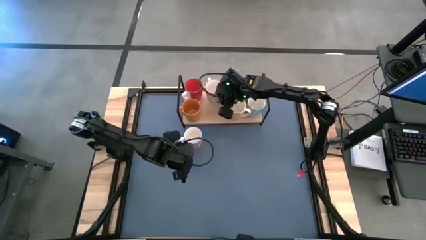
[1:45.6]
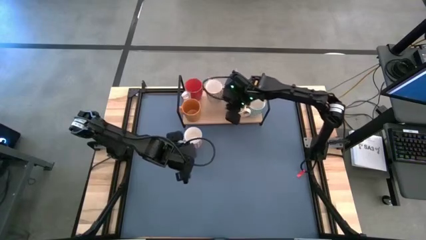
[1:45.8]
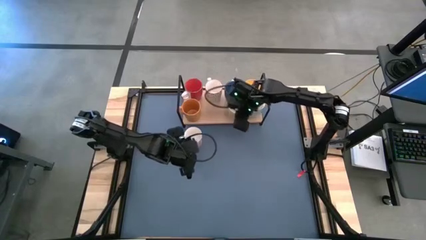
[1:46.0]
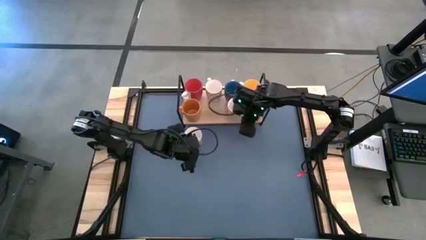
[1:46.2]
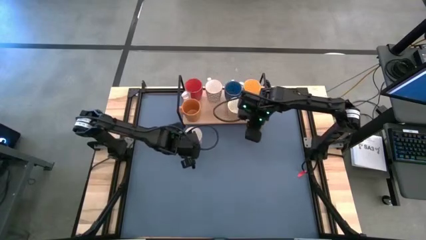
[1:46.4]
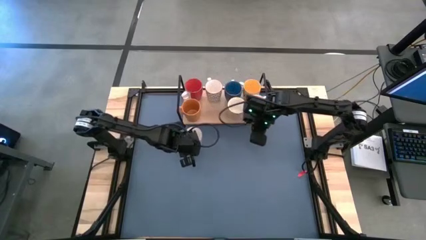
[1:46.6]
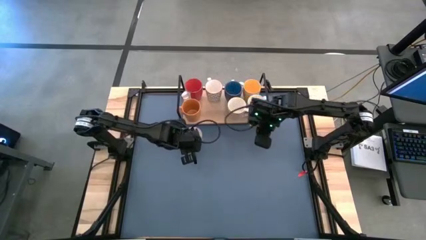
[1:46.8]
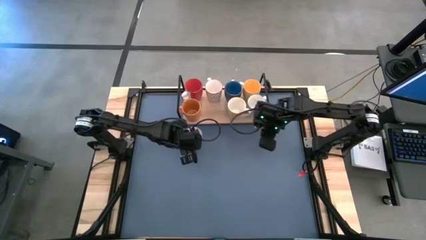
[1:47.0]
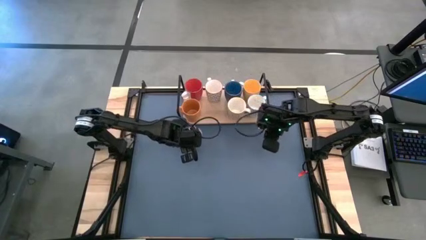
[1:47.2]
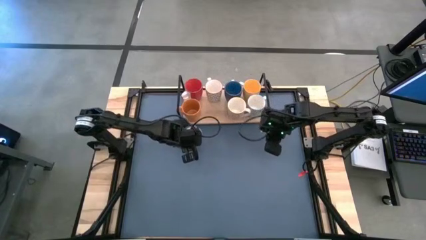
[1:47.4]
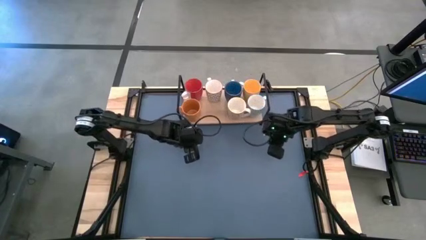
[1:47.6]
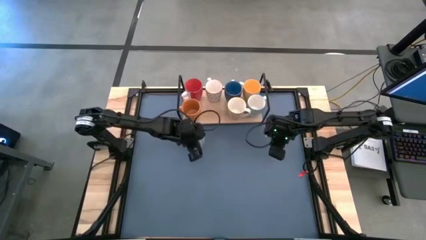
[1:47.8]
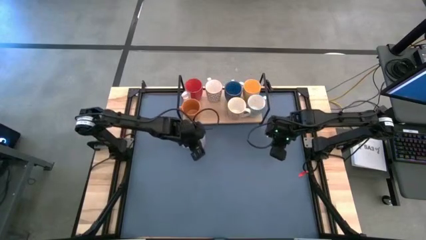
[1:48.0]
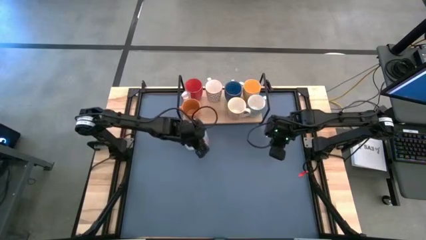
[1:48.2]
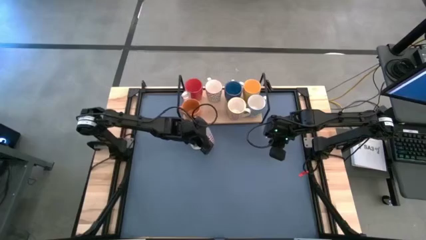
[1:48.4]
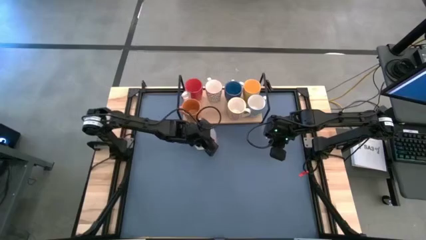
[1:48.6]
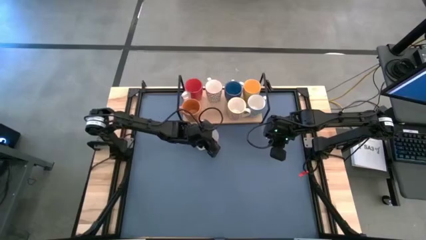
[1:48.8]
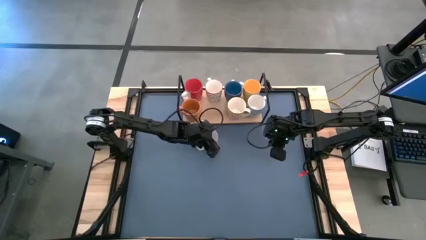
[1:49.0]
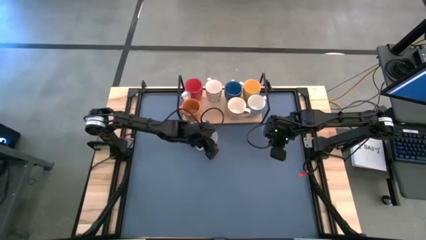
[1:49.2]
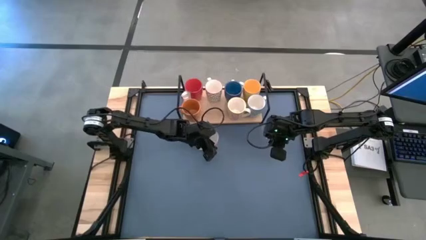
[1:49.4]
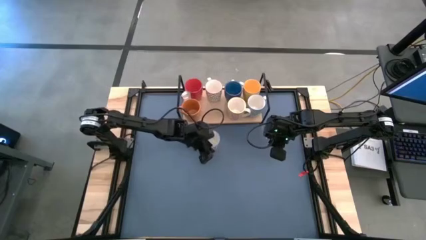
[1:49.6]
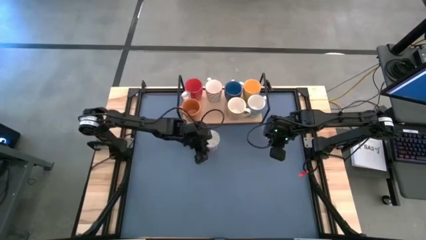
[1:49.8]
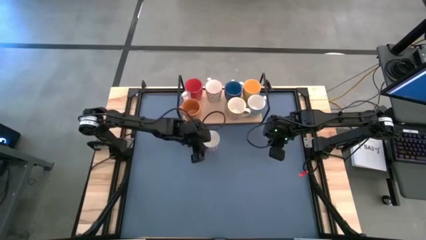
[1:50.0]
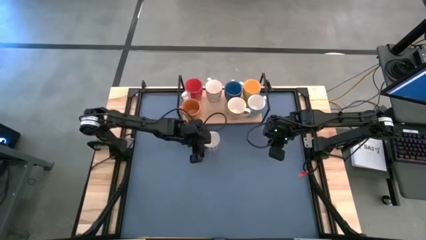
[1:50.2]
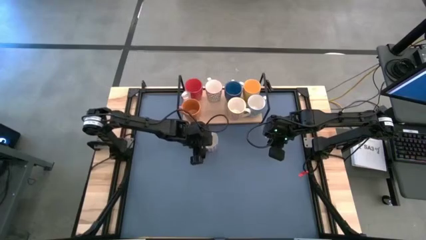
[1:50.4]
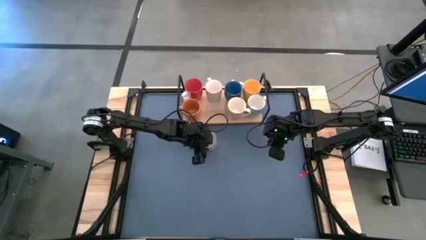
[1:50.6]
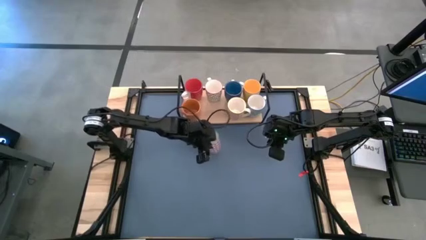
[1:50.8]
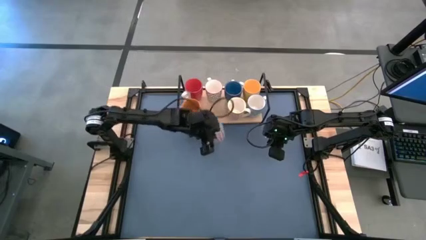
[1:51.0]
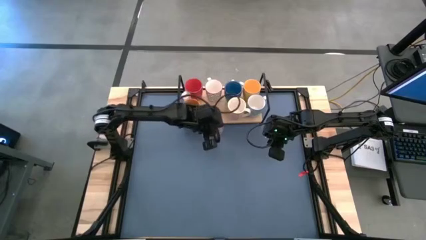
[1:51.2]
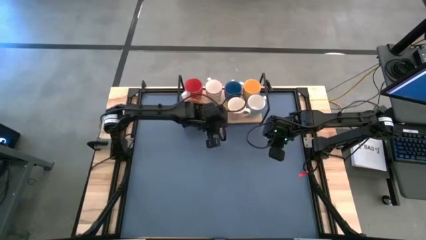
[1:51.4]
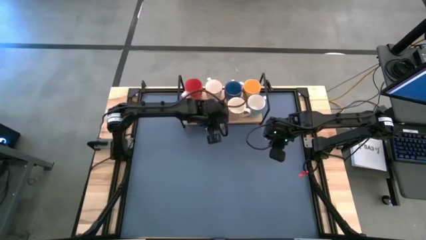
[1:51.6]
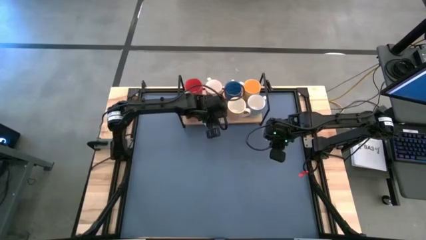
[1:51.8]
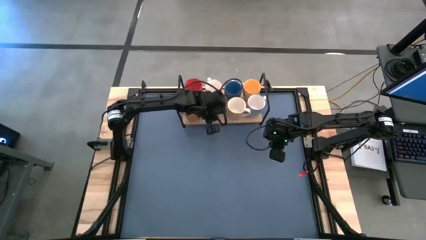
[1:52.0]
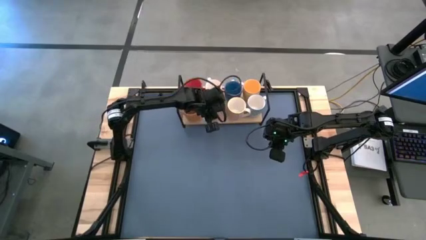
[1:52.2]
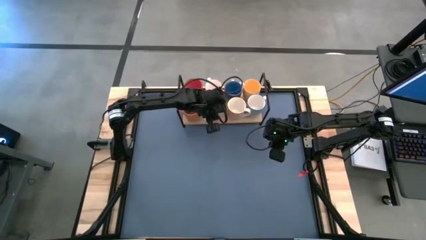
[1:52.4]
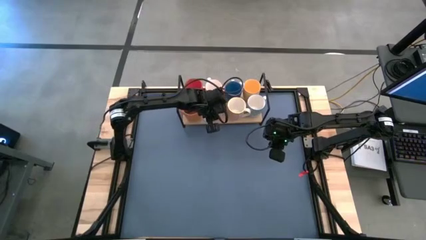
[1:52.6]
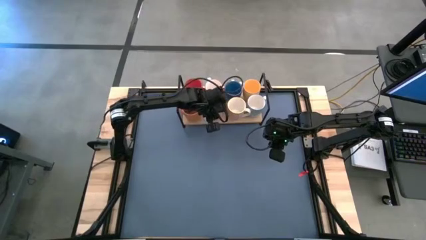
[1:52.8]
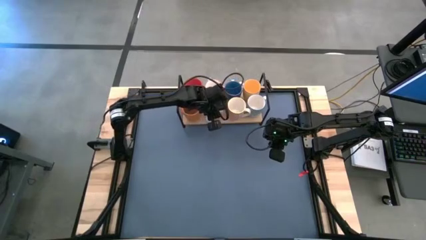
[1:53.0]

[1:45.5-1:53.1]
Task: Place coffee mugs
Put the brown cup on the shelf aligned with the other gray cup

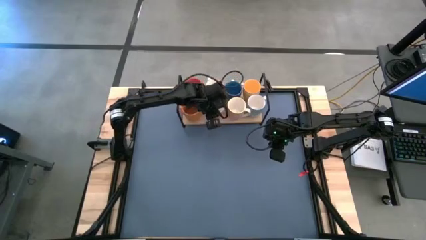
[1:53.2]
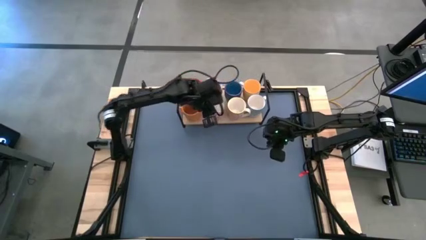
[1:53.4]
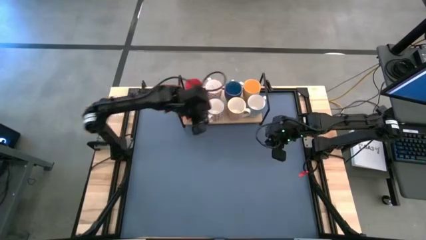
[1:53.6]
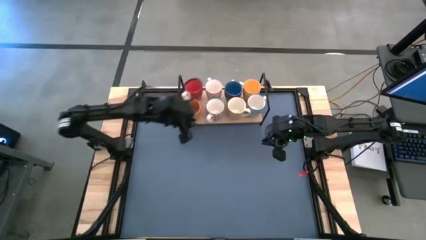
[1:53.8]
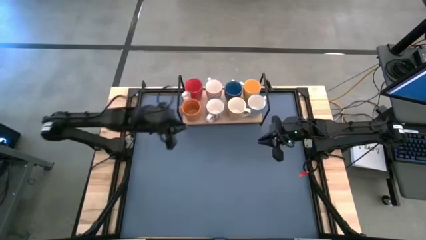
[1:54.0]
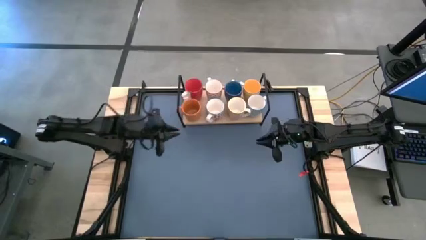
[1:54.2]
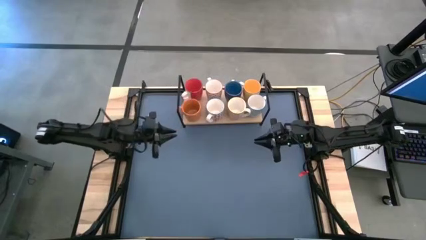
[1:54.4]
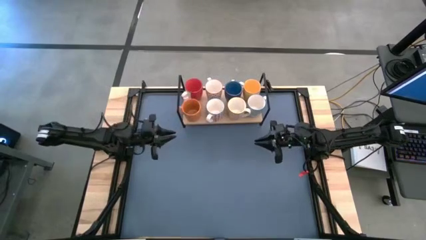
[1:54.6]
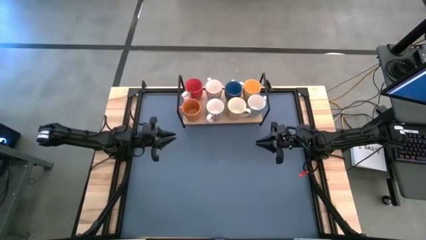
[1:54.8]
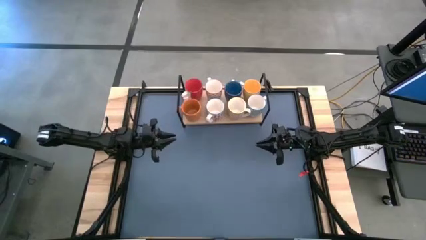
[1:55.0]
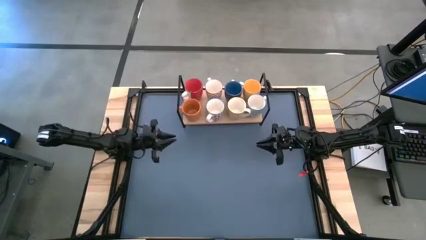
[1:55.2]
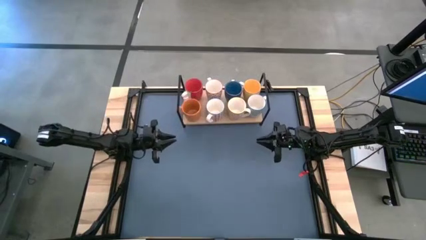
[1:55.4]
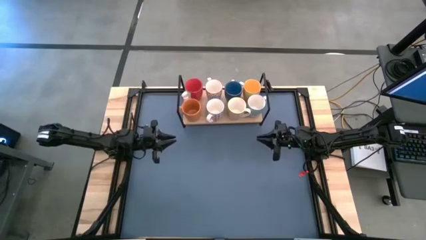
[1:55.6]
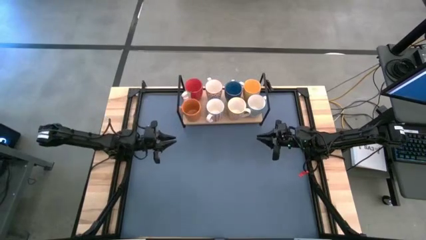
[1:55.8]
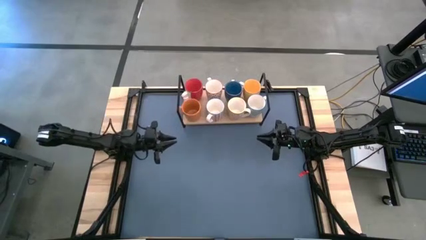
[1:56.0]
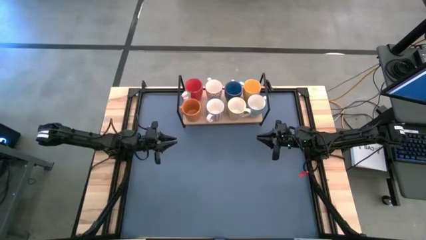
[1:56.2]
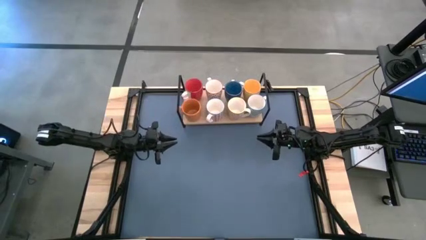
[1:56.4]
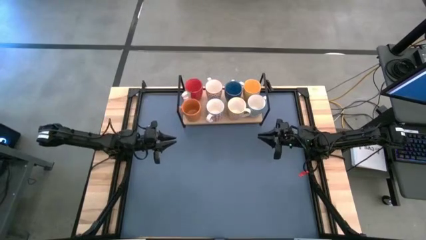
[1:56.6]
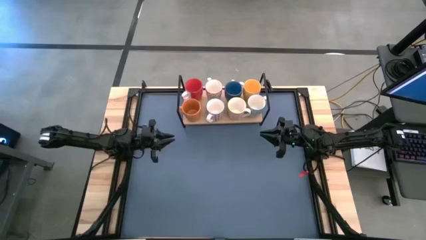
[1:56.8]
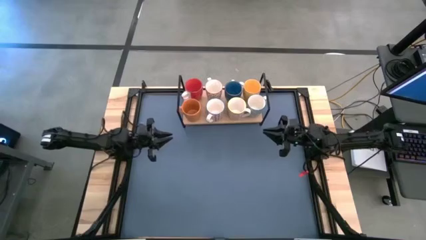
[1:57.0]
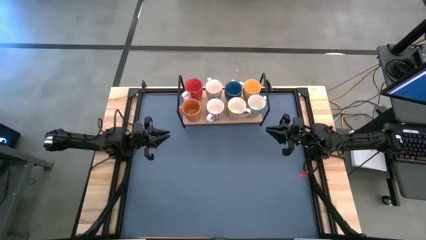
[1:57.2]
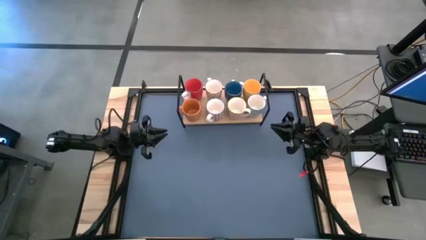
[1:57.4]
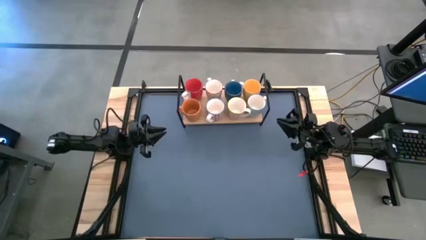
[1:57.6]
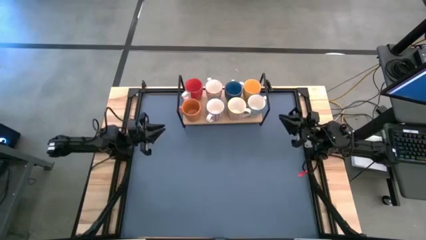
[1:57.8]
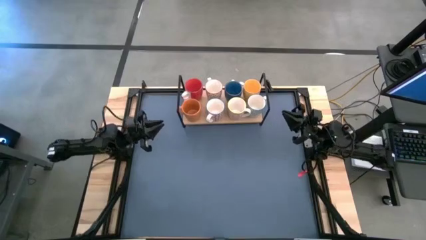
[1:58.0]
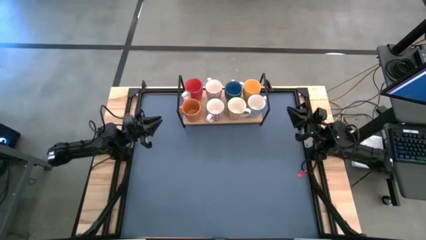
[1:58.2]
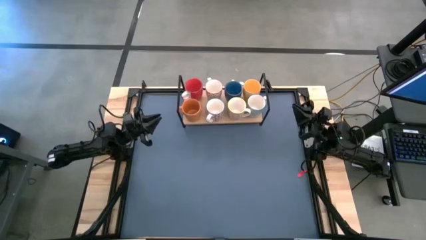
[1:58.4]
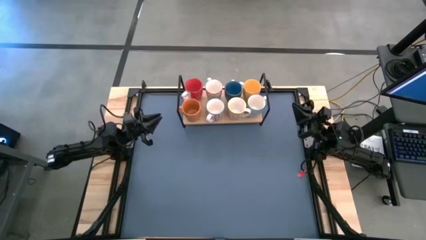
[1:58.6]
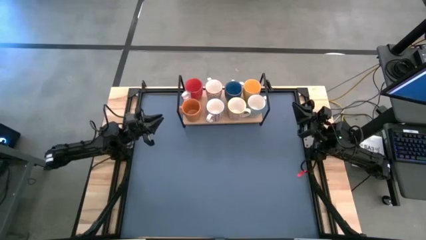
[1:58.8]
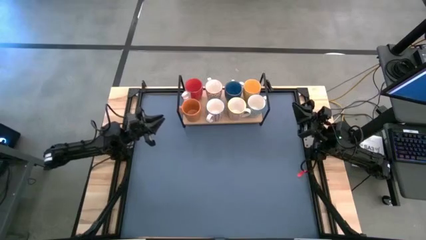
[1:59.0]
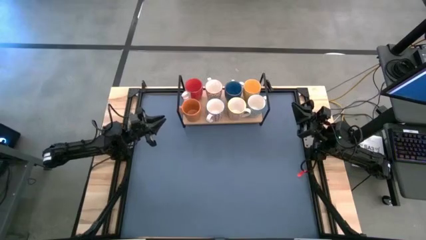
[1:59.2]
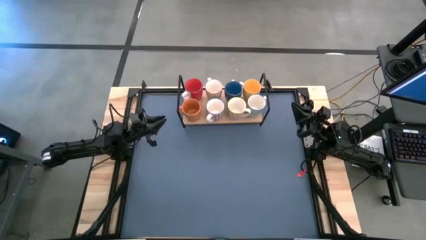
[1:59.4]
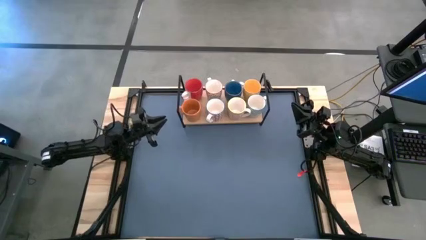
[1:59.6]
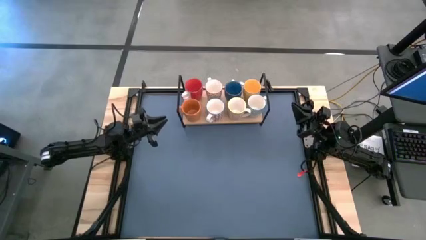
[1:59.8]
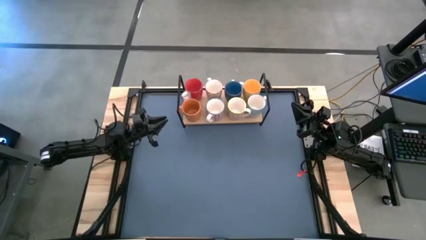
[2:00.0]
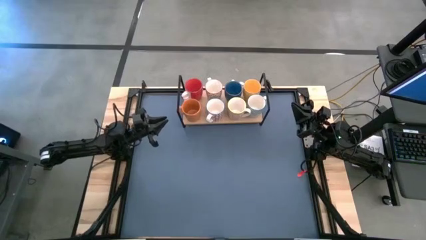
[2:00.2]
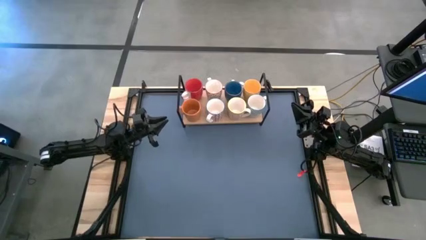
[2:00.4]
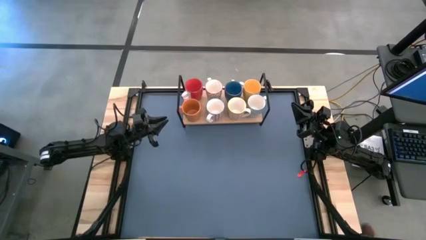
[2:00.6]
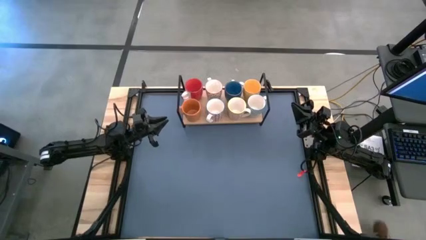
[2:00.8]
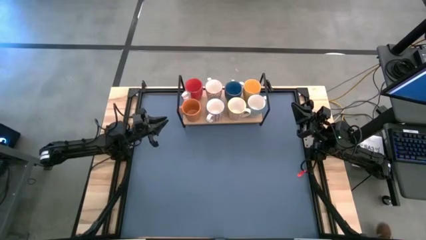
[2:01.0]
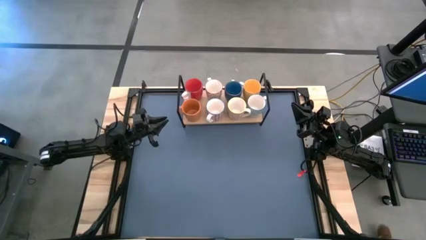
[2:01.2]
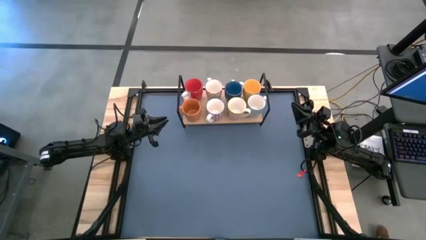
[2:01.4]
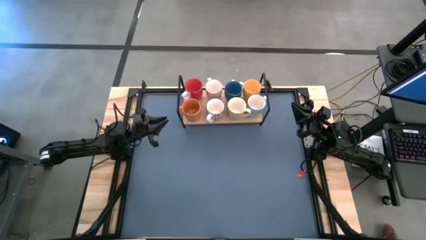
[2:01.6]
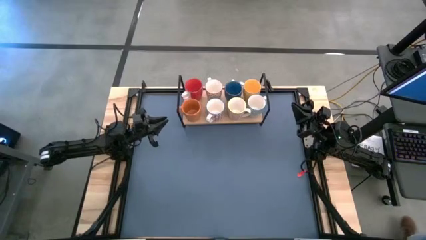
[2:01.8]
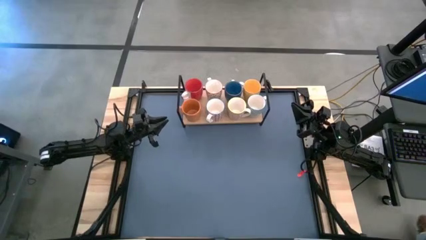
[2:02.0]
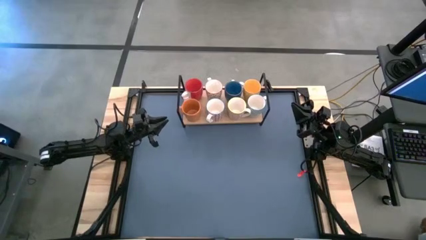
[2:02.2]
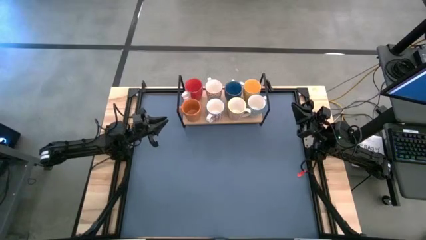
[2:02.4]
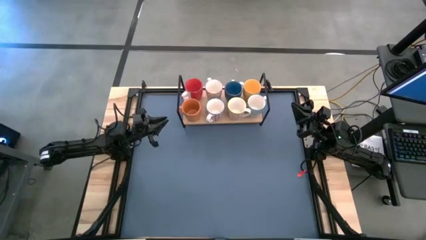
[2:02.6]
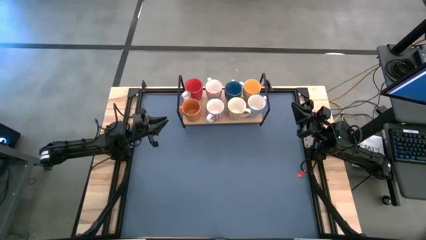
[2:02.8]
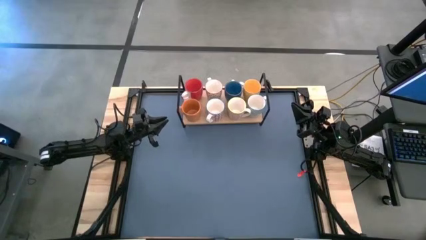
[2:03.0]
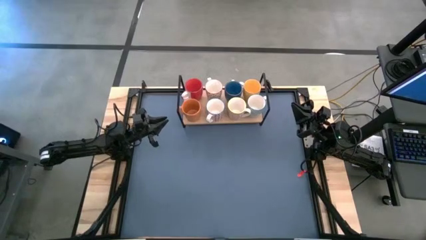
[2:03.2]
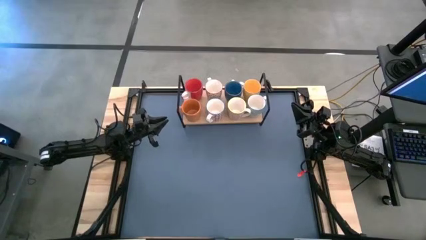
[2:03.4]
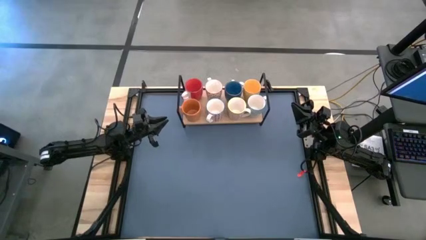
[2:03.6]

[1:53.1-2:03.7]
Return to Home Position
